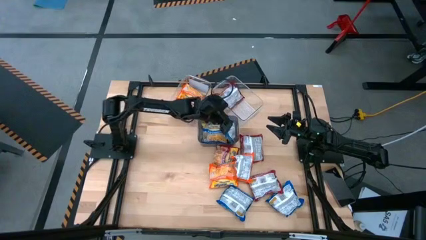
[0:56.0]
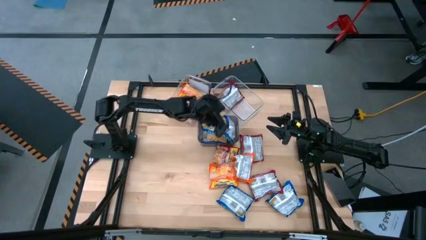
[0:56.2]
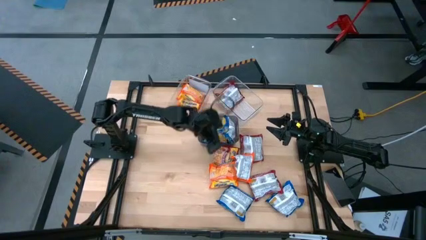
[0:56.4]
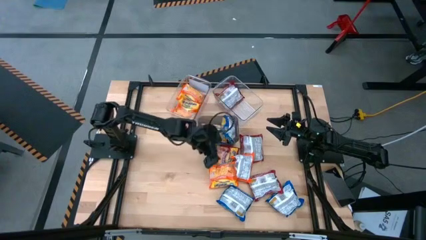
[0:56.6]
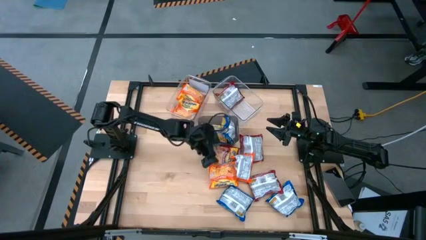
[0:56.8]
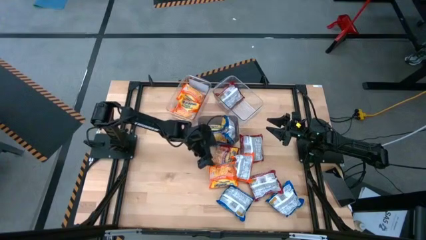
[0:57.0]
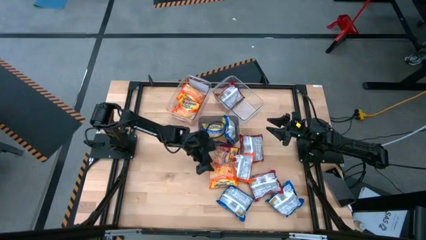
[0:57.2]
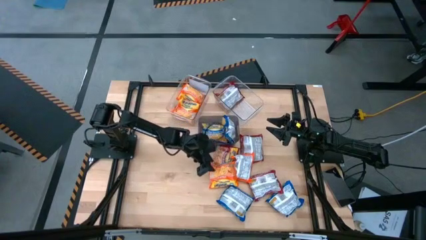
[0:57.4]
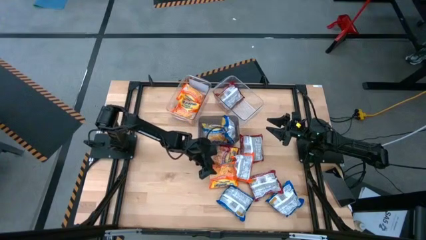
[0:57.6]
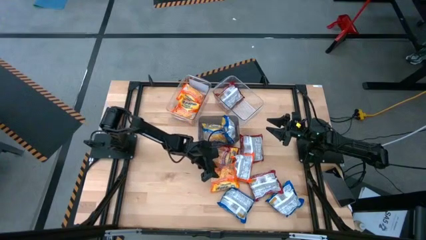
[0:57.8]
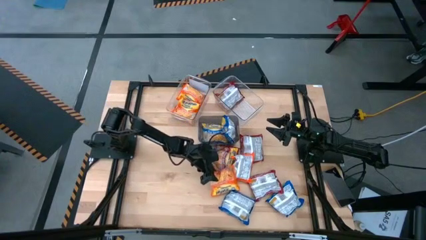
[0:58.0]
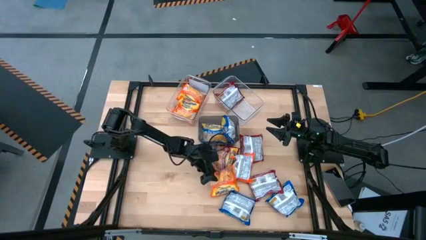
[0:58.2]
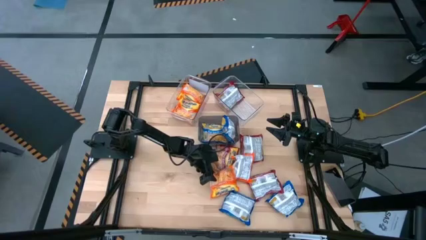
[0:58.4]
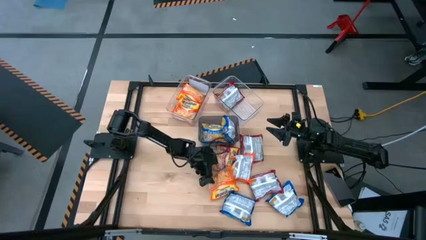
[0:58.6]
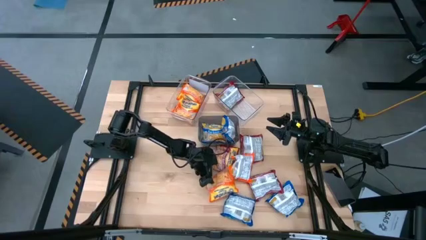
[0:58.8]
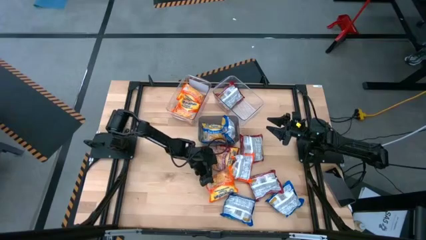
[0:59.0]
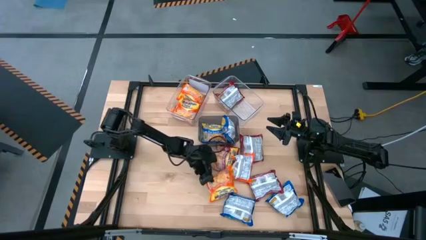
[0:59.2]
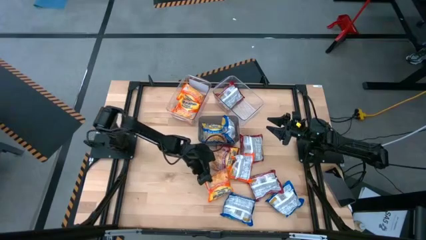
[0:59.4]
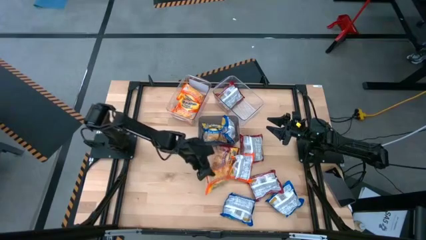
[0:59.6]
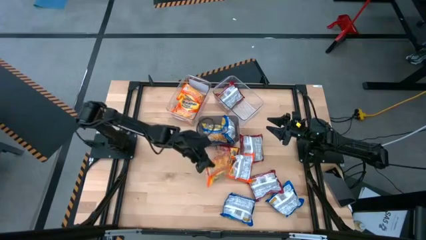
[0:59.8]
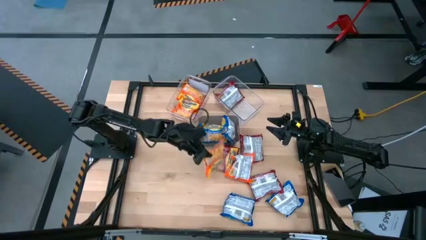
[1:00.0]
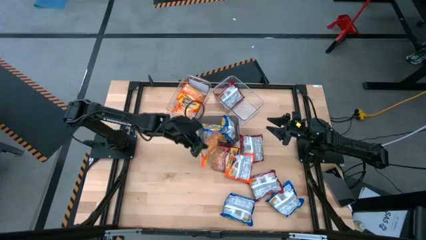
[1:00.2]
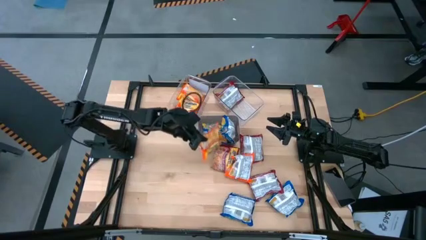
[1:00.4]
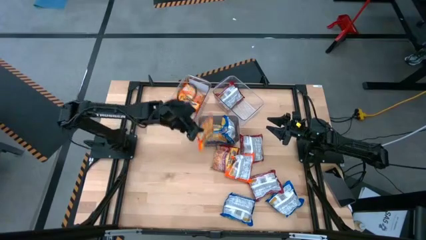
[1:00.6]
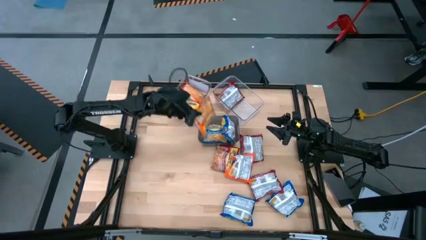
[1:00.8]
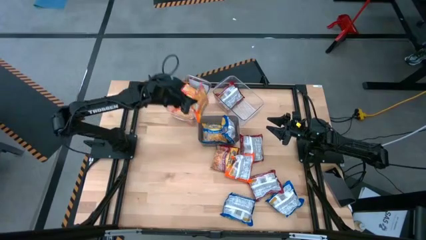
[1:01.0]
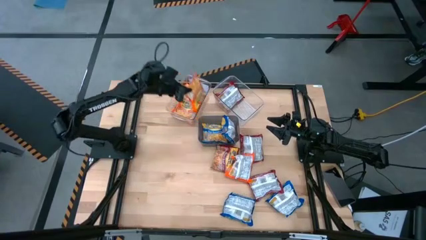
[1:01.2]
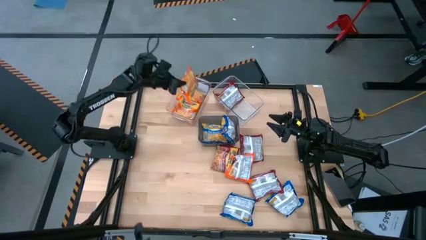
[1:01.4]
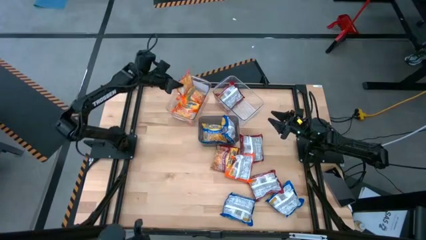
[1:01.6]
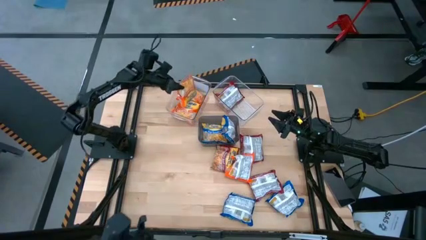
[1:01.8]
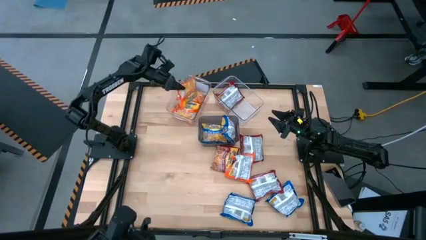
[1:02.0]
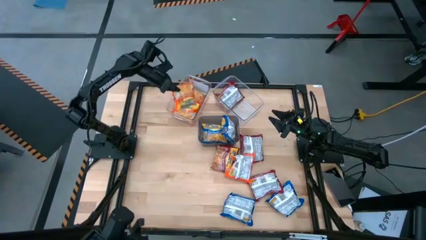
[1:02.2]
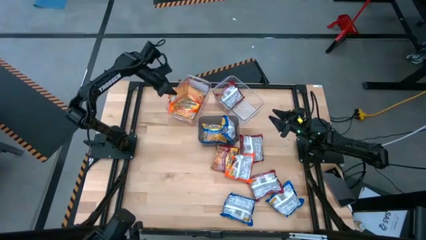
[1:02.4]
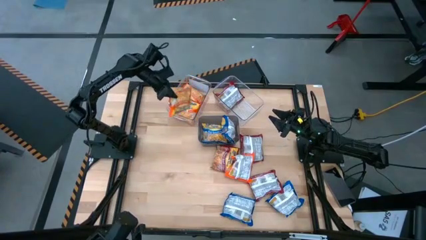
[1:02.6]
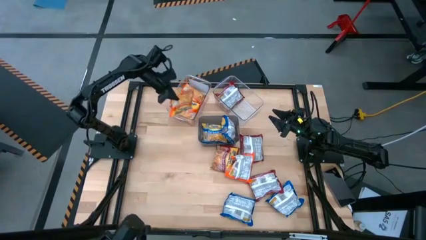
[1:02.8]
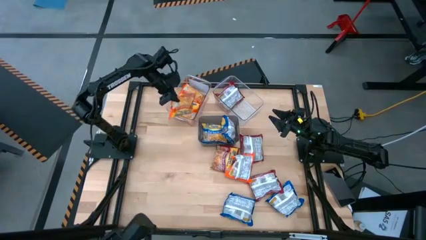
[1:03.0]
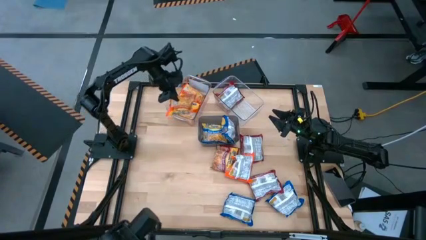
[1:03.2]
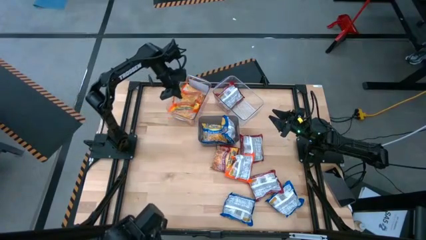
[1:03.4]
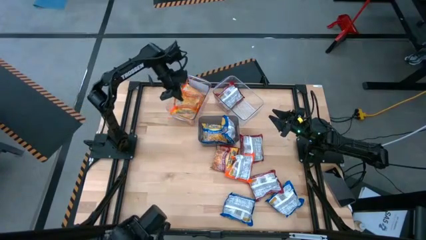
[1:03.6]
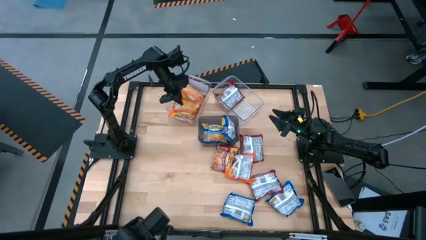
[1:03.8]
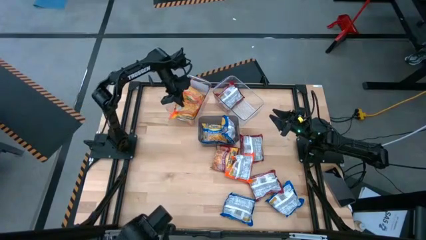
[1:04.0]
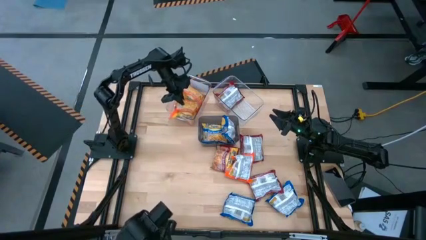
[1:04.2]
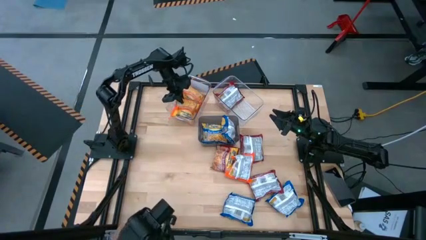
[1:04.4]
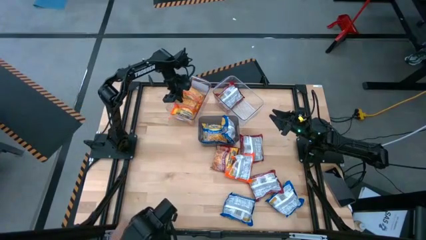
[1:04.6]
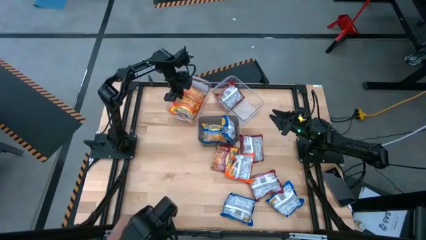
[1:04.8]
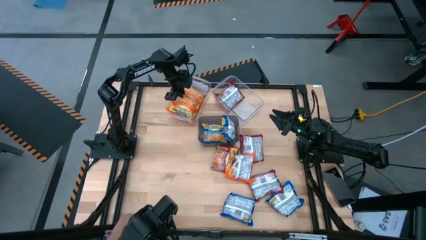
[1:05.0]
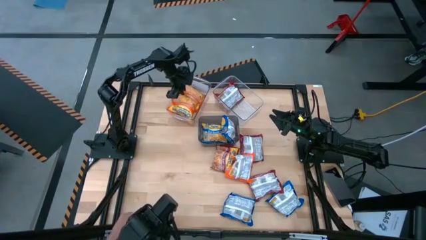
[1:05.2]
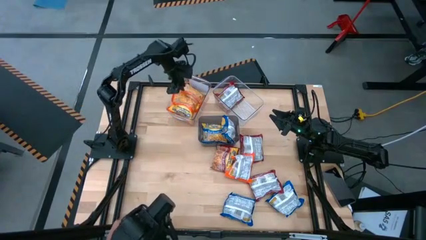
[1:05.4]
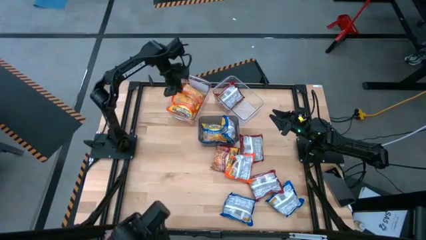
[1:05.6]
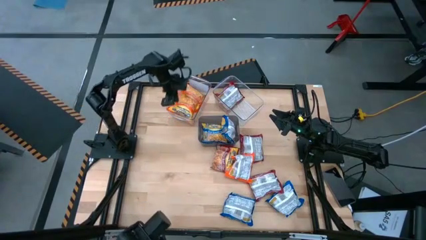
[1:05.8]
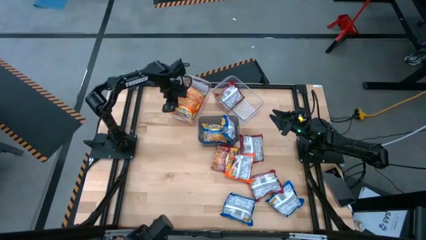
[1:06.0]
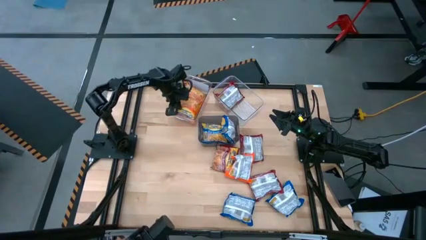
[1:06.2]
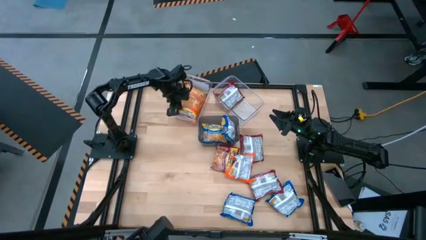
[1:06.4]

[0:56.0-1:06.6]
Task: Sort Maruchan noodles
Put the orange noodle pack into the left transparent bin
